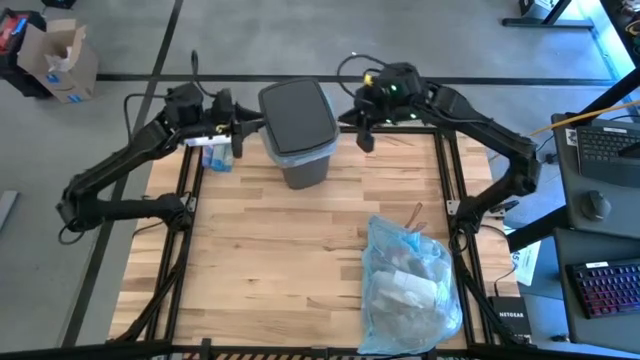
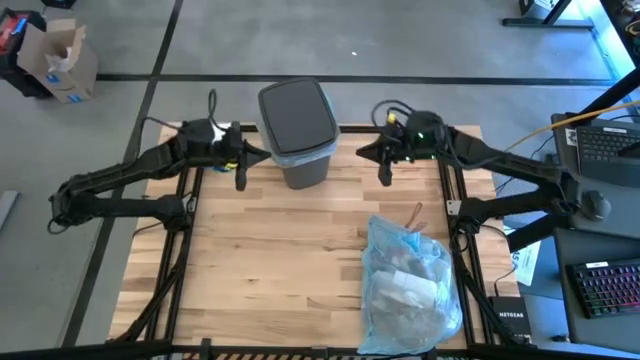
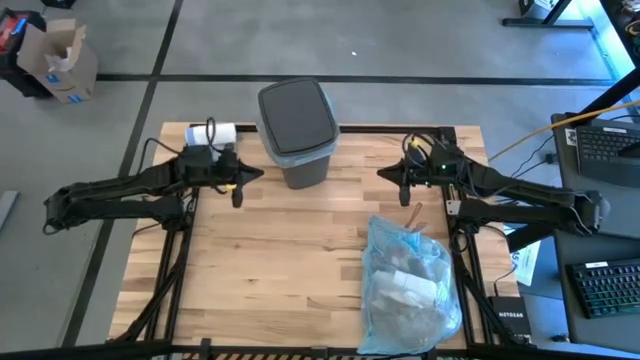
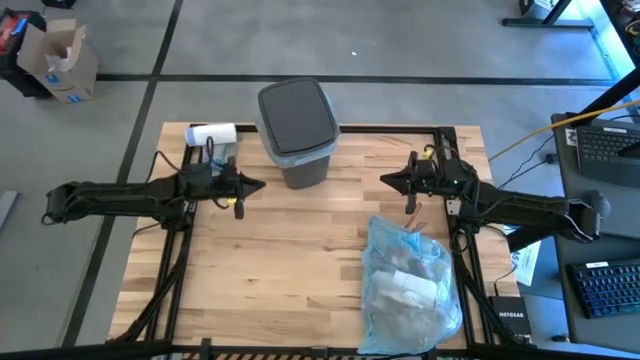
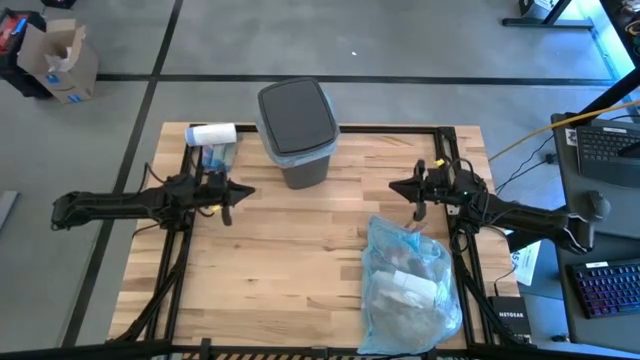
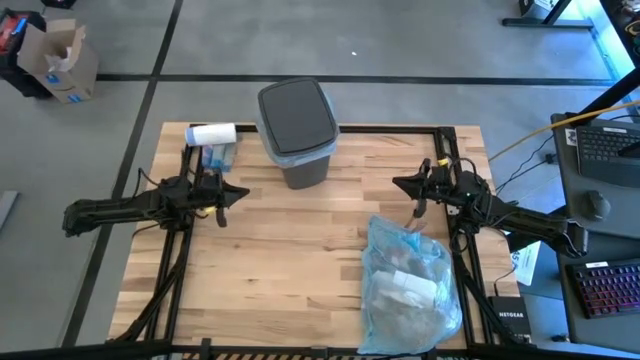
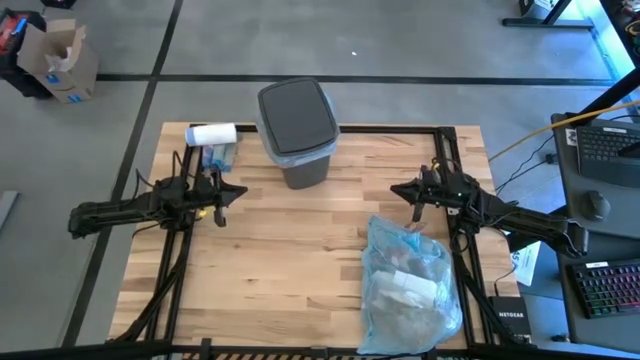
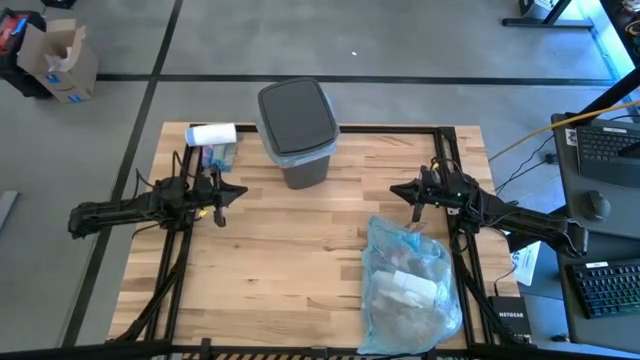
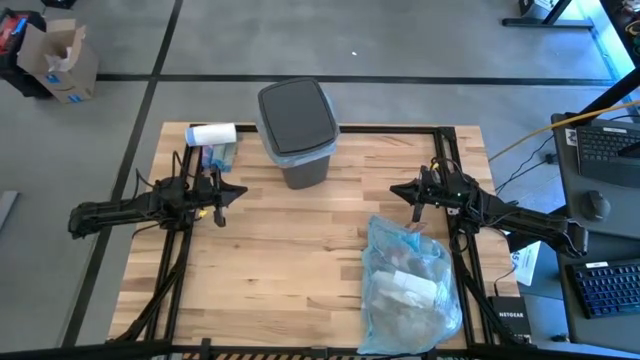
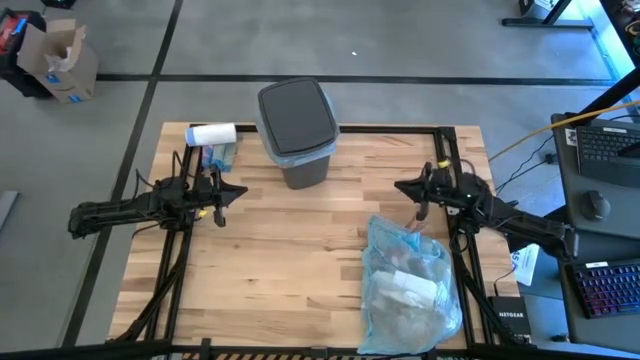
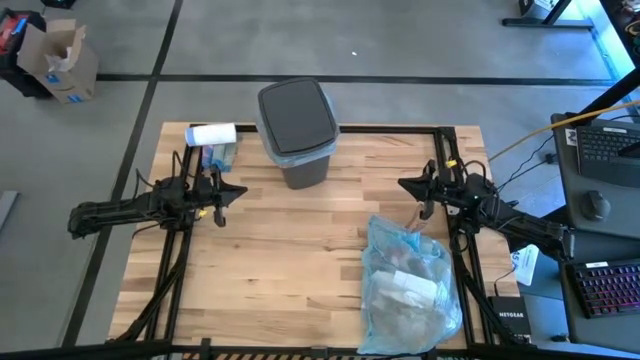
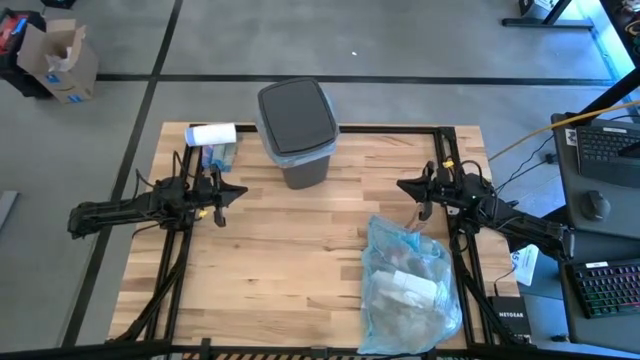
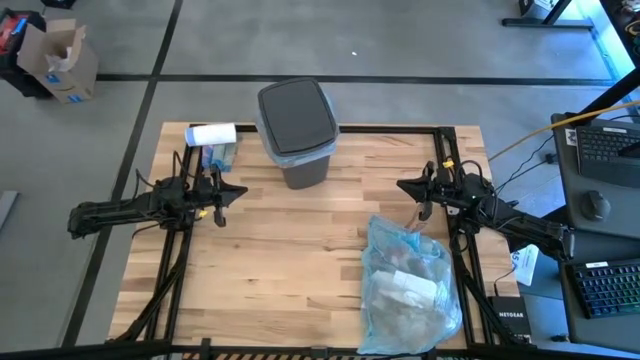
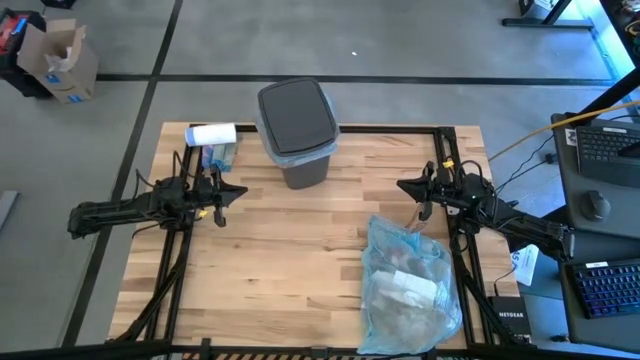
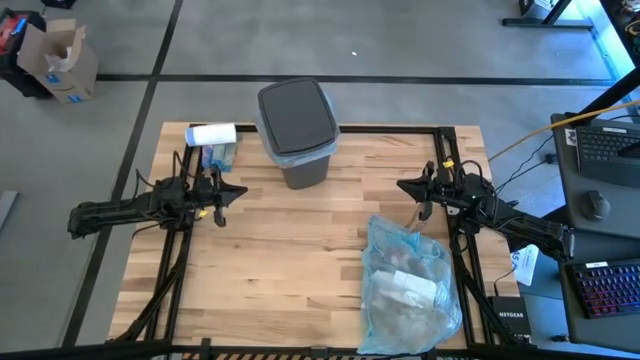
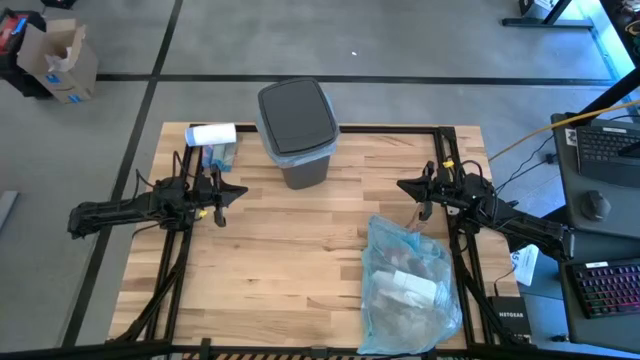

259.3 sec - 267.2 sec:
Task: Pick and place trash into bin
Return to Home Position

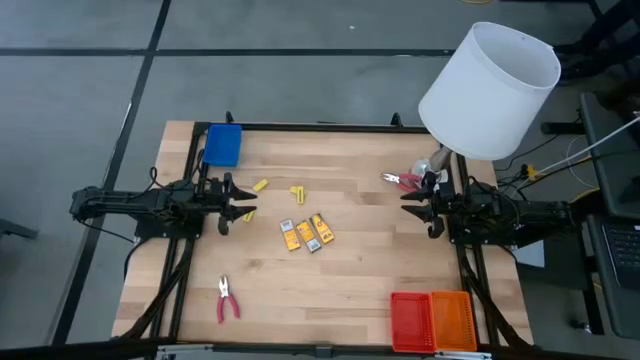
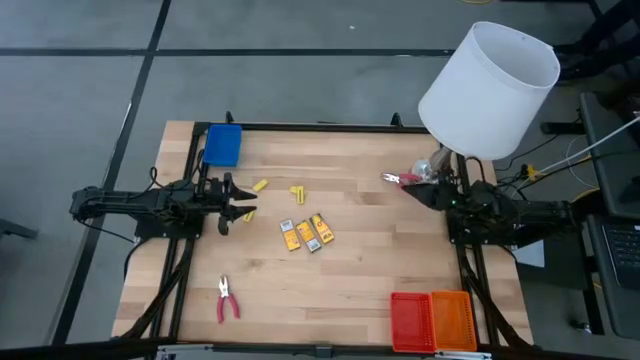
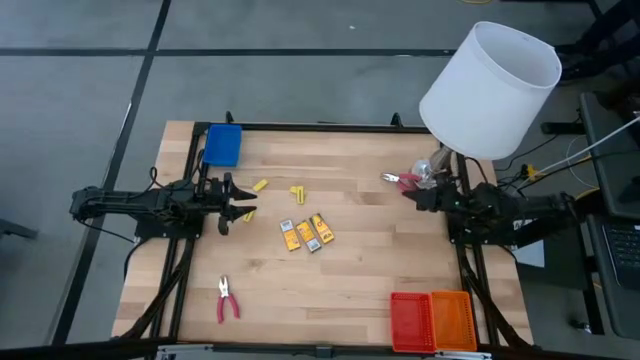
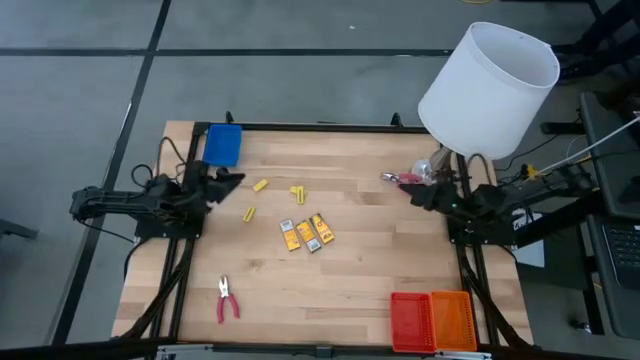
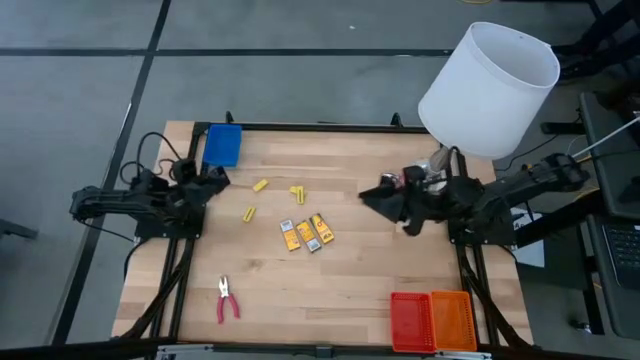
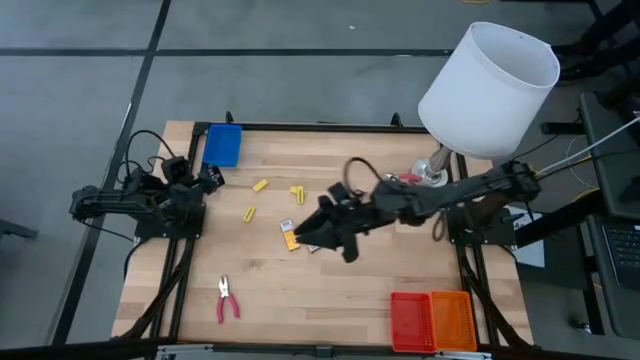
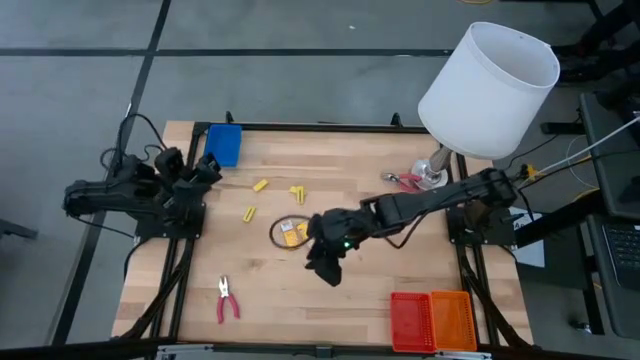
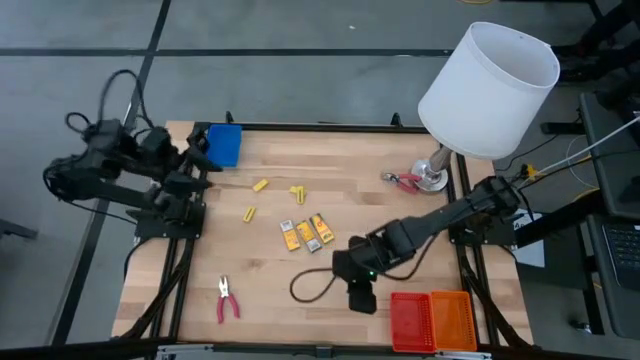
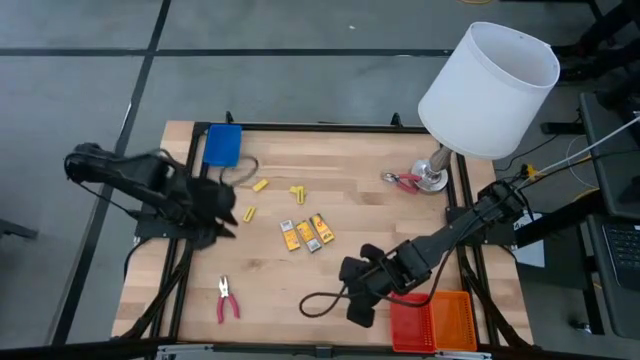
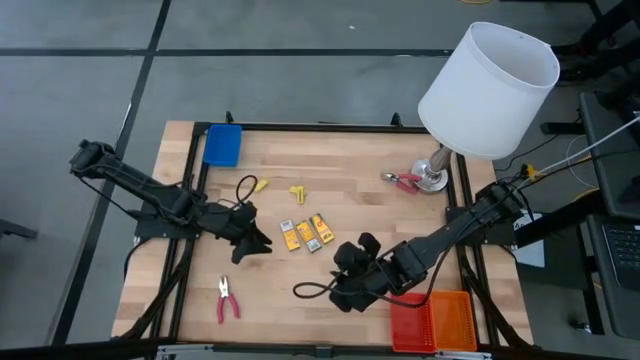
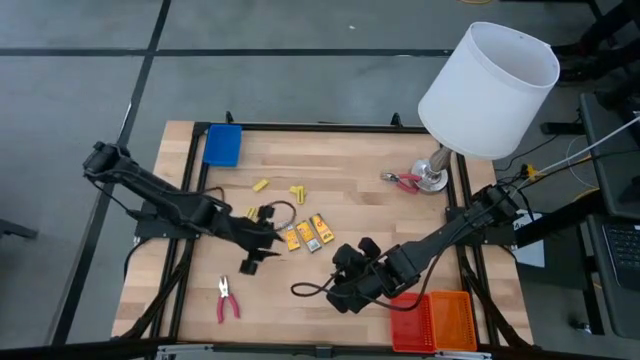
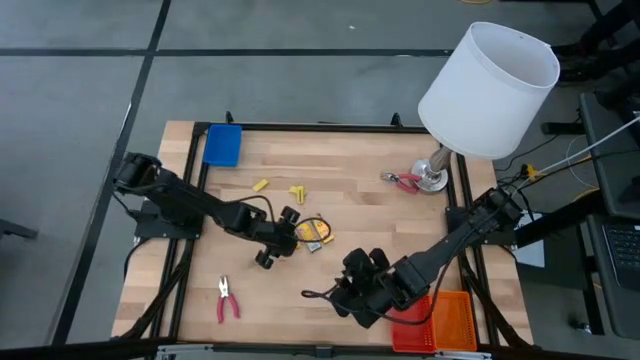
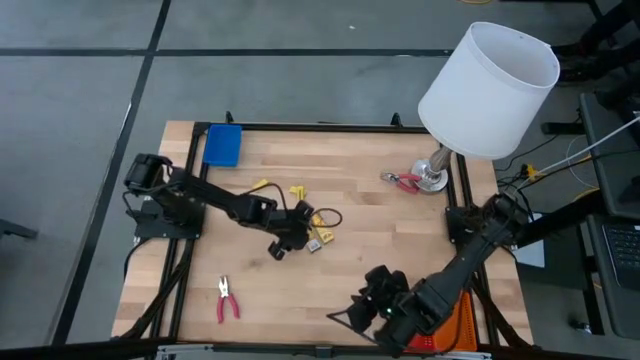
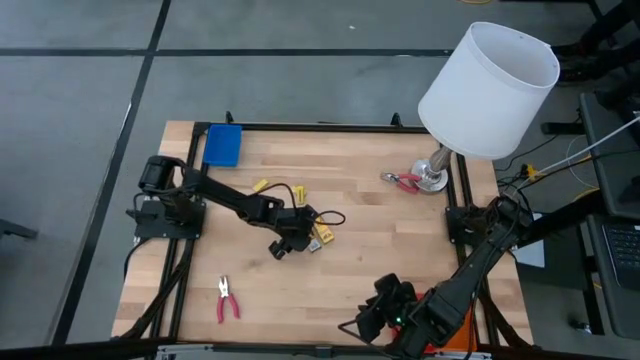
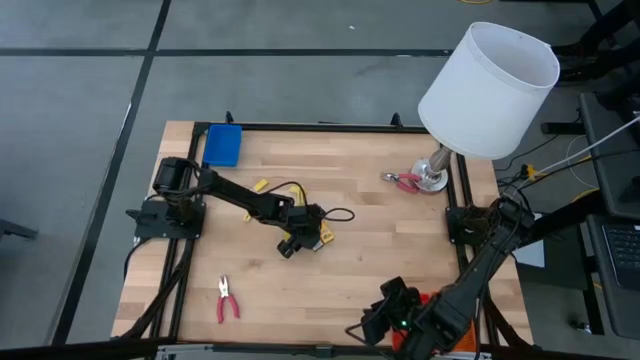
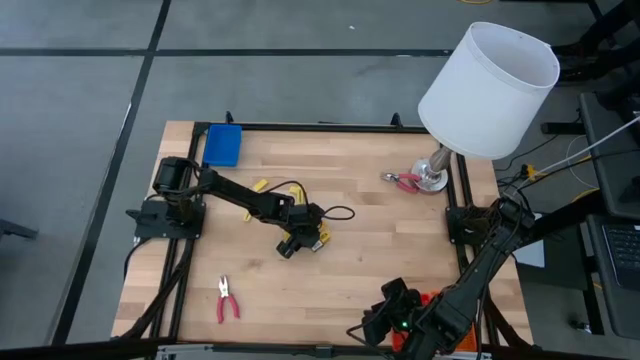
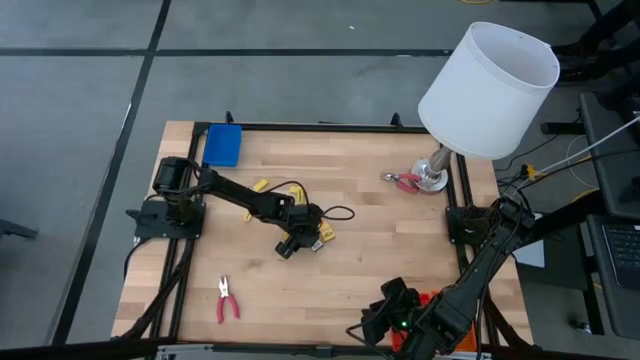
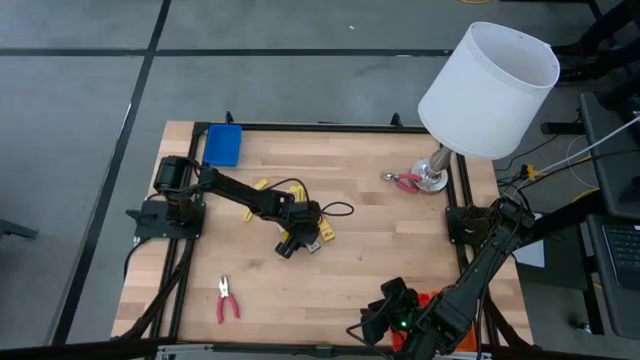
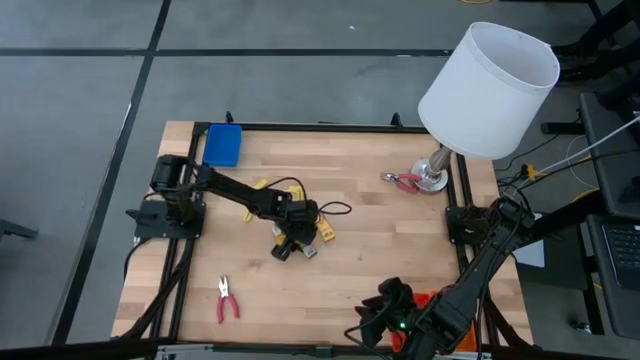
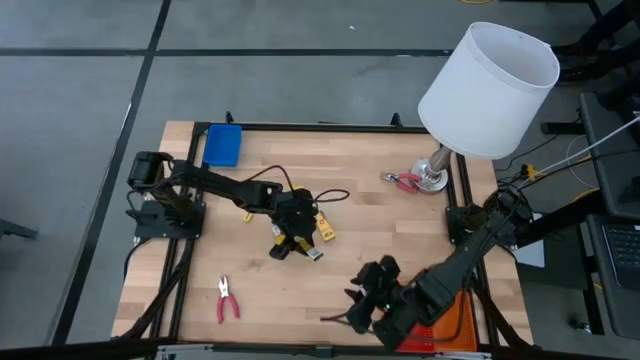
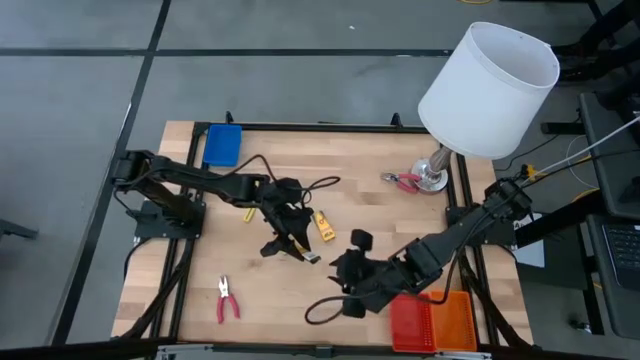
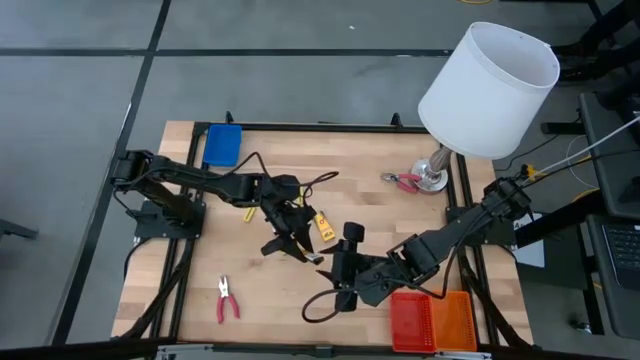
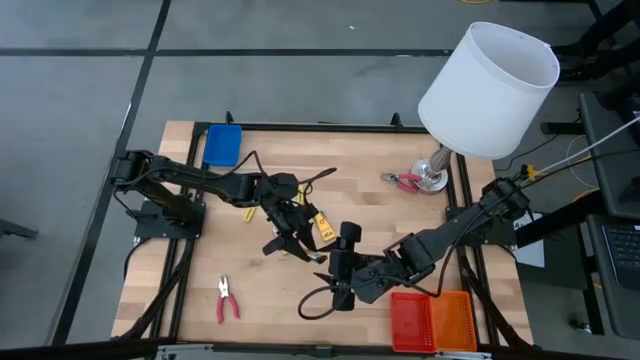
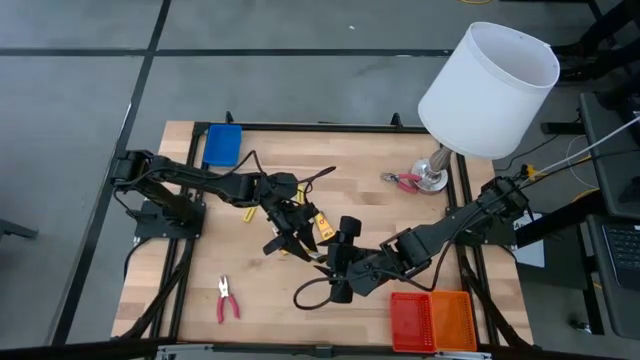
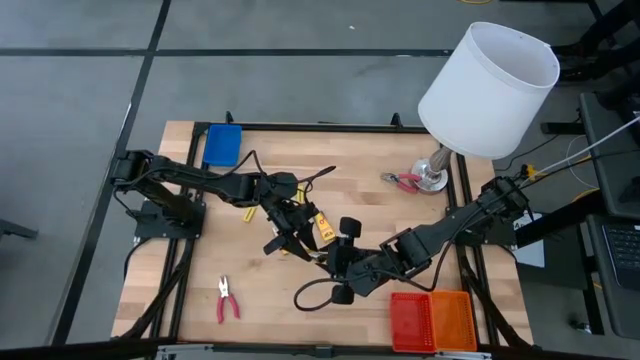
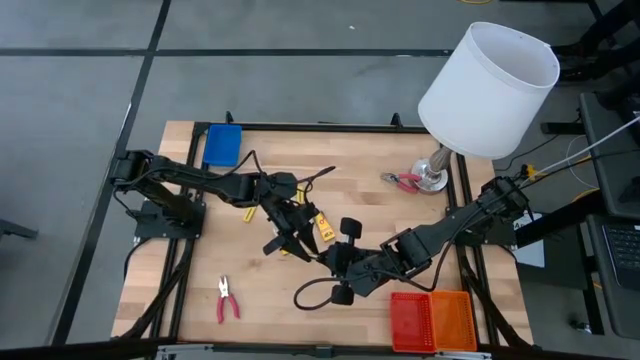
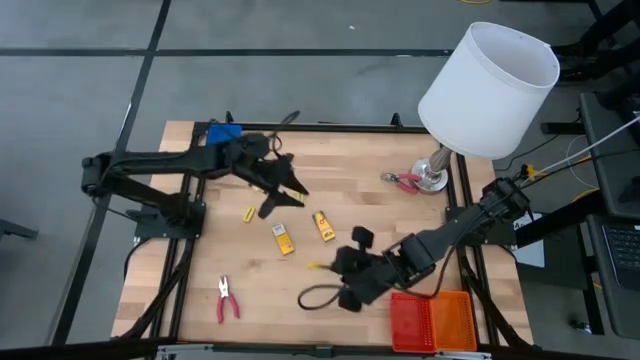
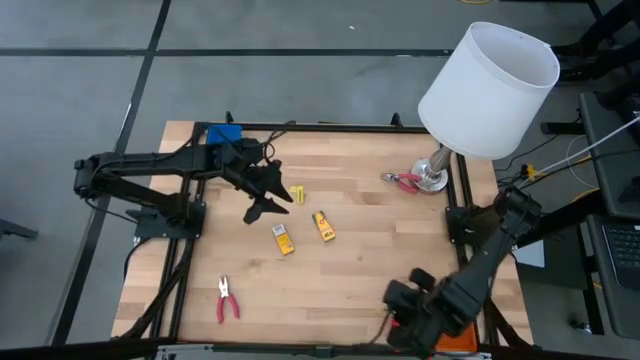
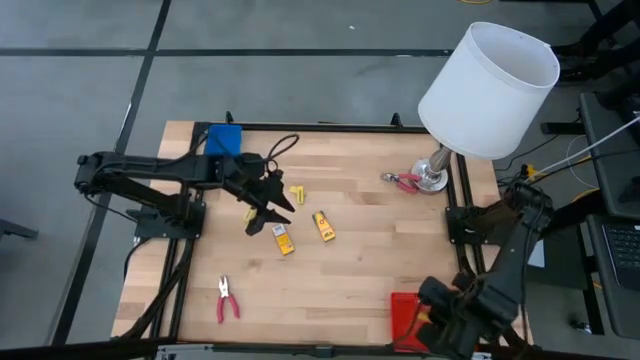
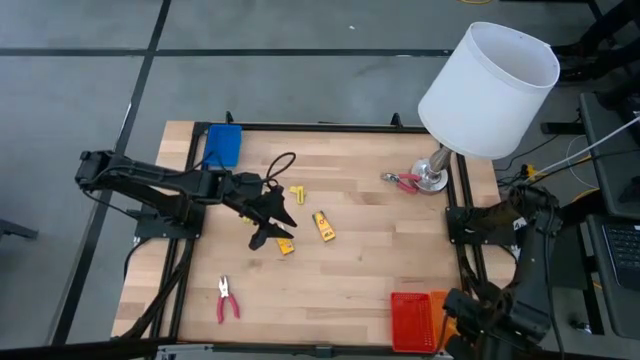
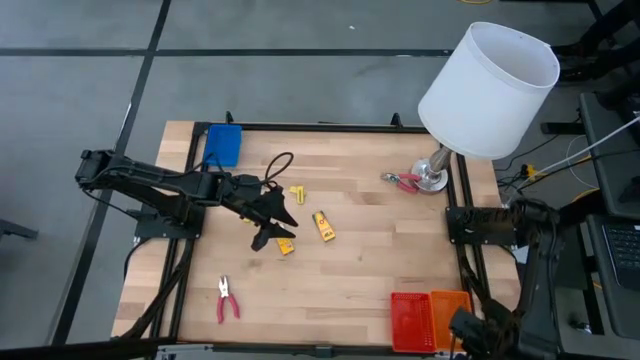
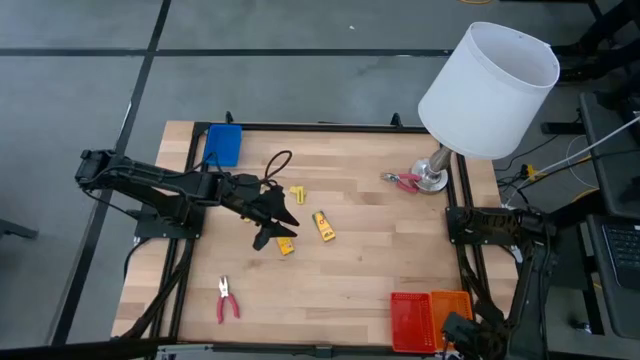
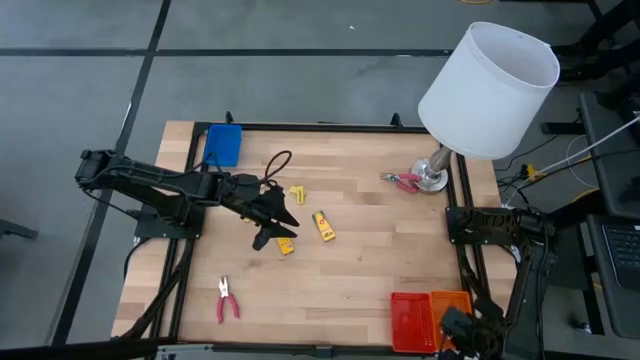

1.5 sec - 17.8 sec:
Task: Pick & Place School Supplies
Put the yellow crayon box into the orange bin
